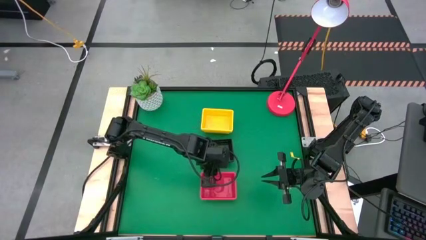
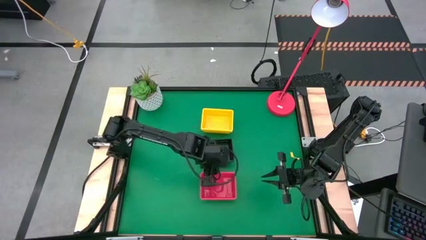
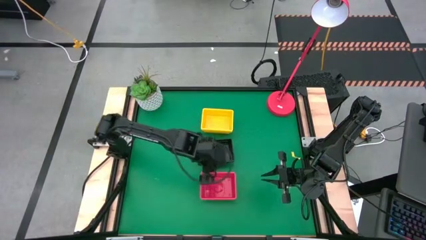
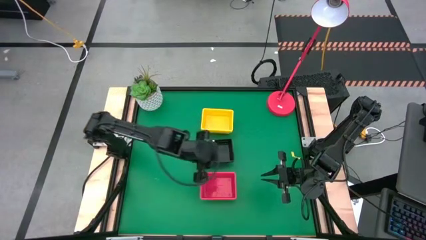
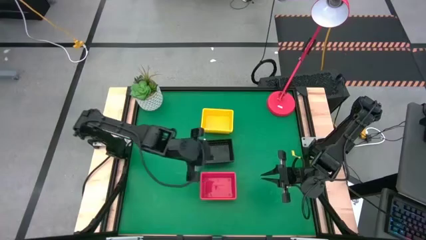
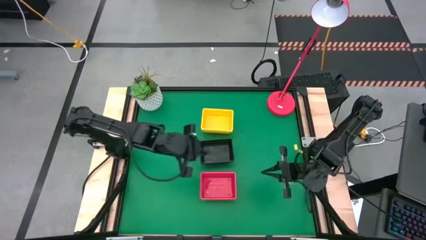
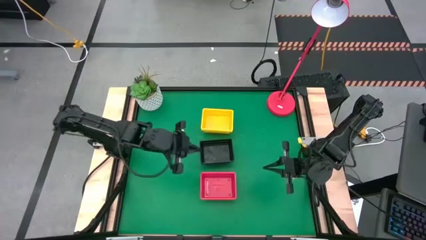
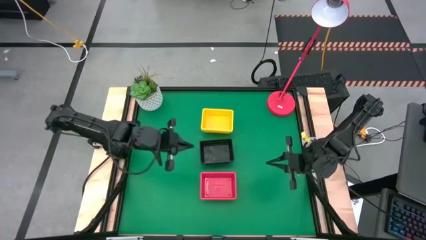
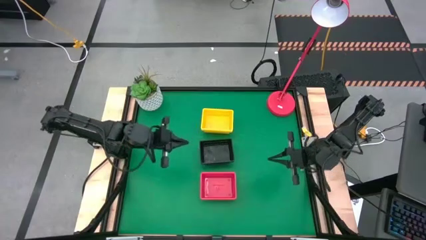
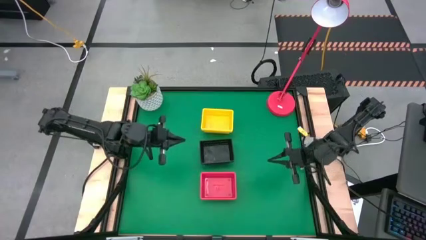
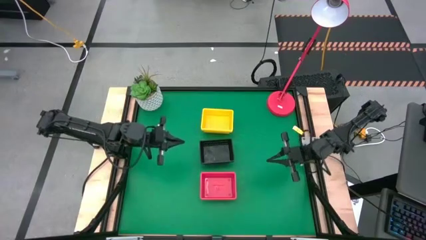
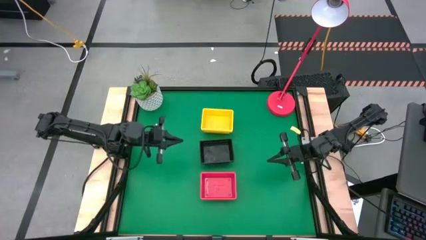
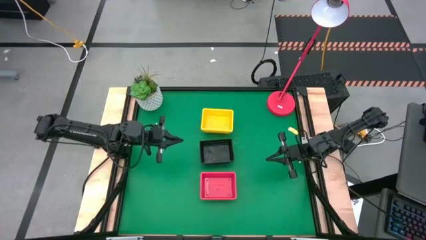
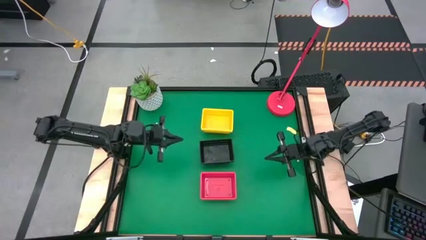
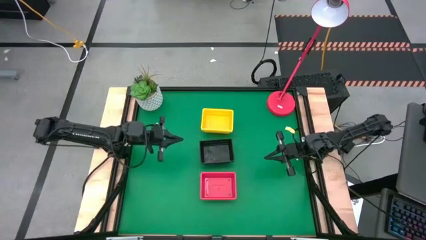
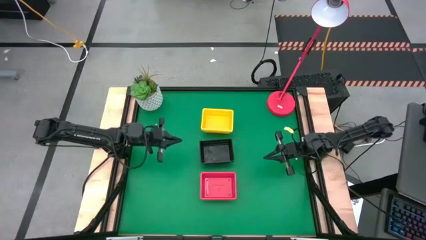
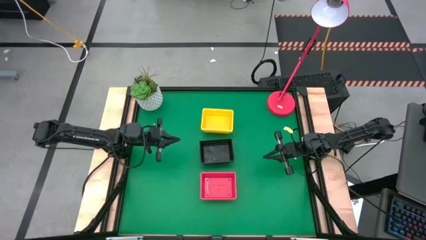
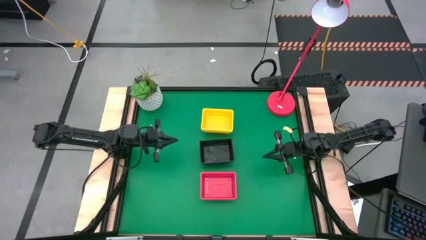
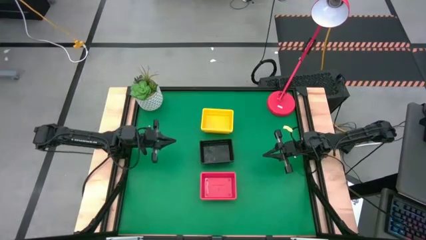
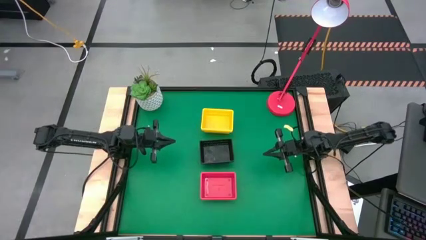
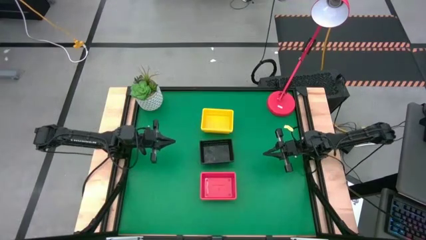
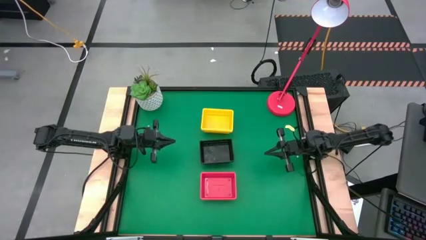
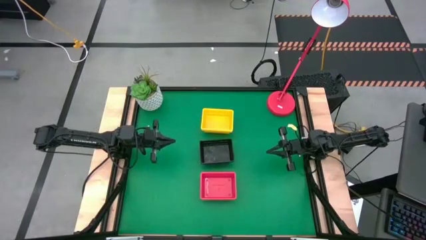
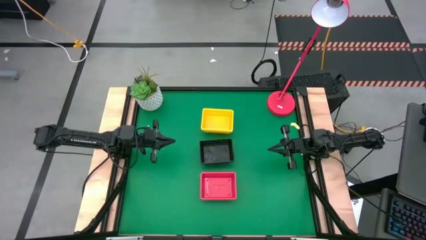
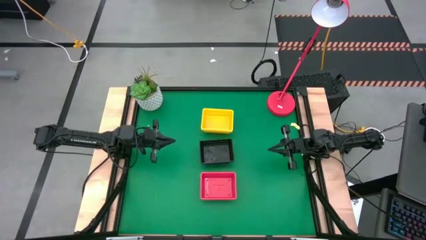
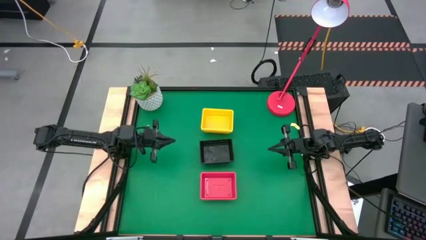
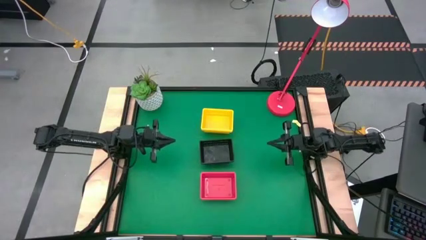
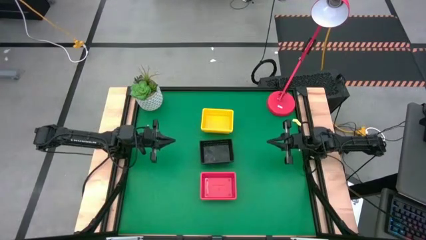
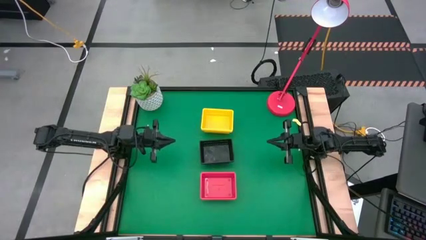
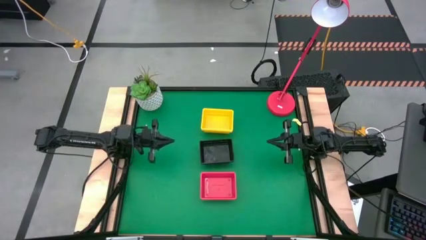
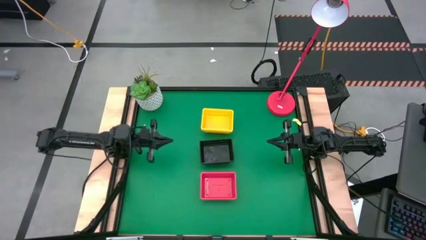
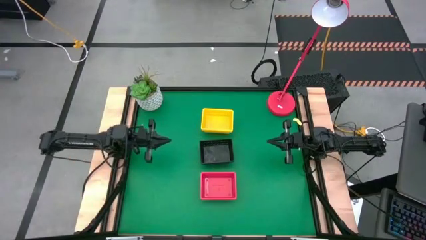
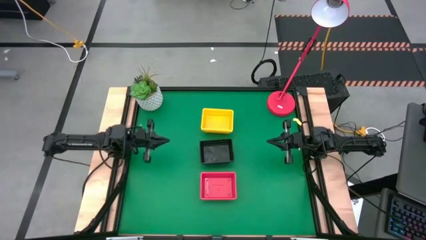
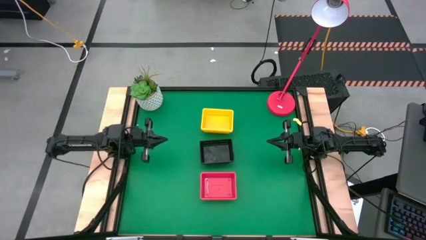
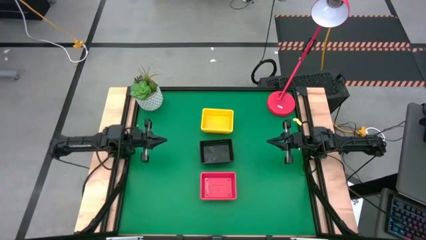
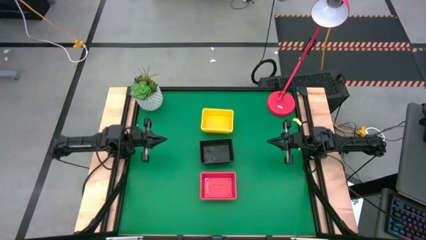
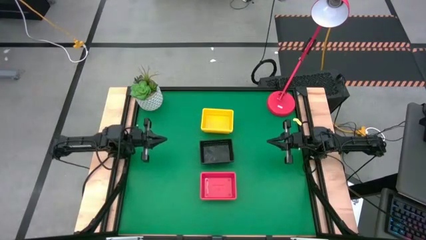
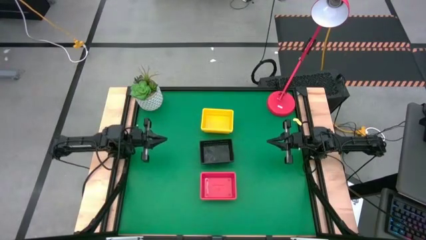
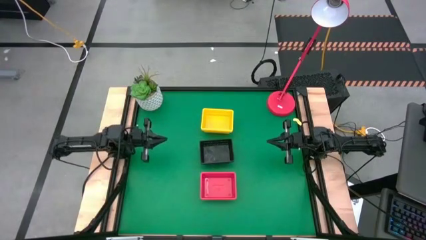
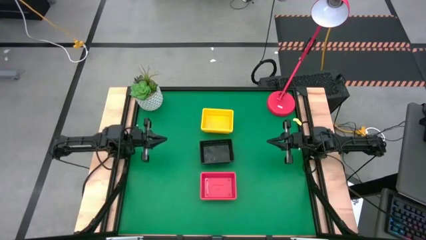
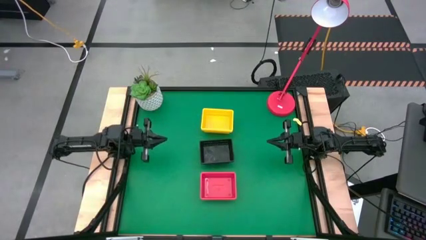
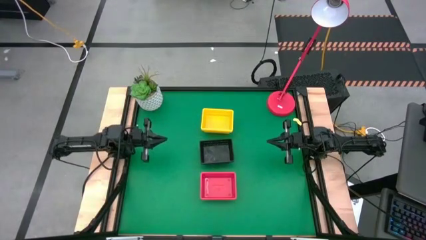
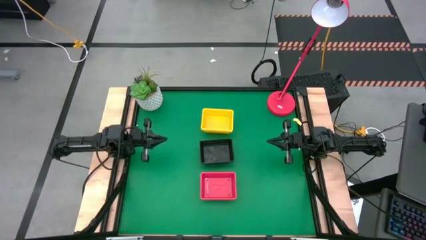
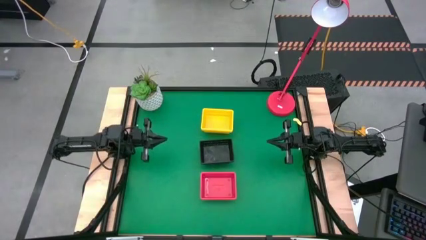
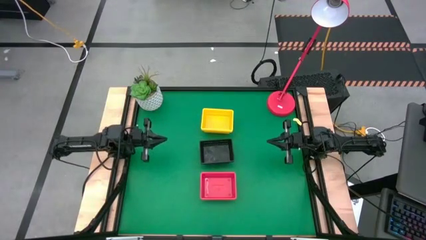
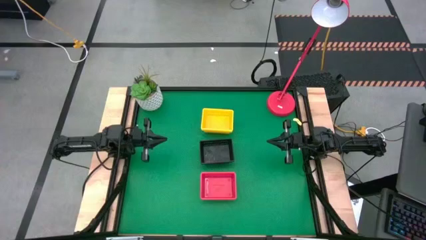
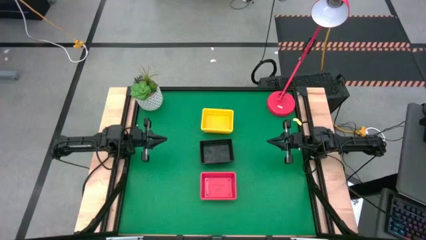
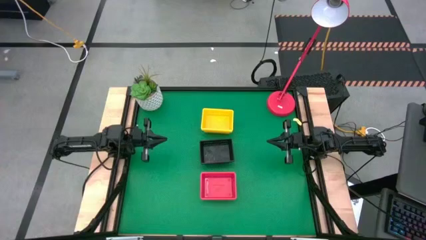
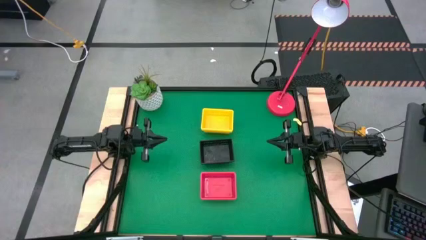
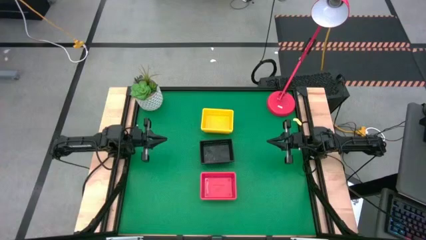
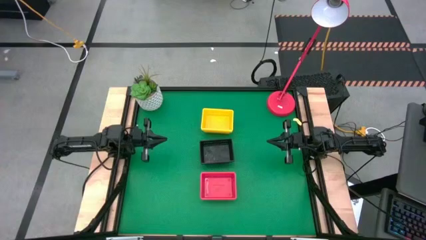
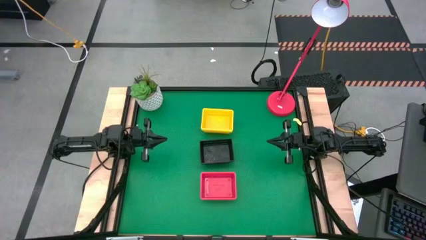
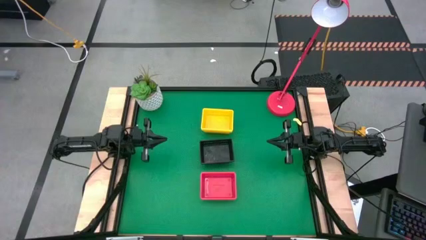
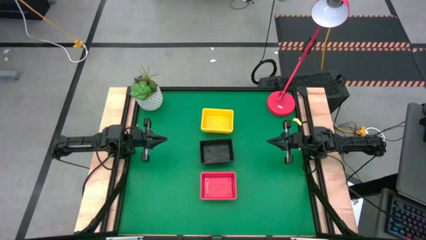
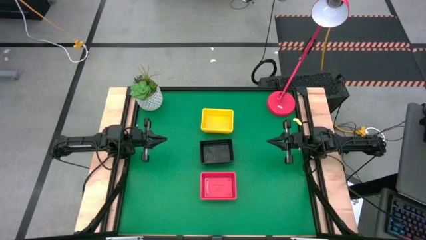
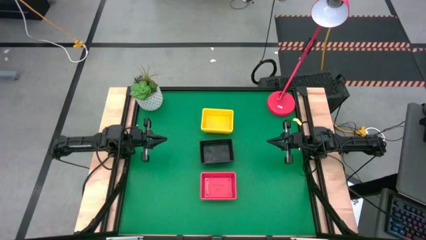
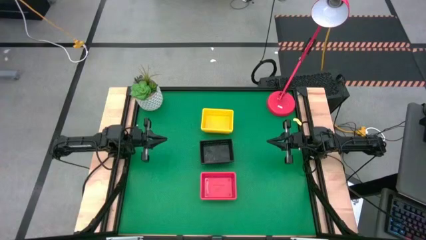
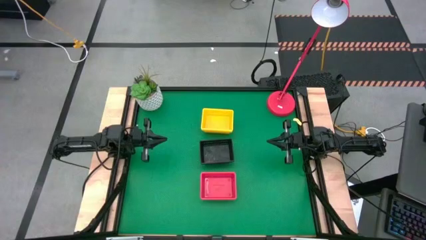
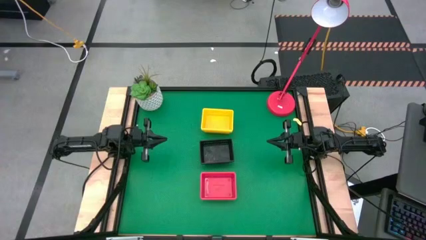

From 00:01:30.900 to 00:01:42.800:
Return to Home Position

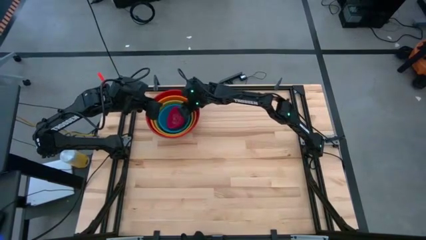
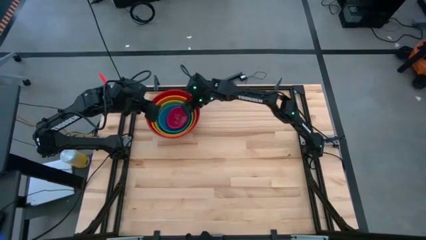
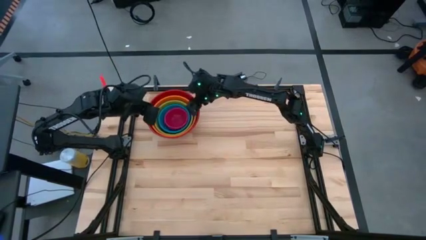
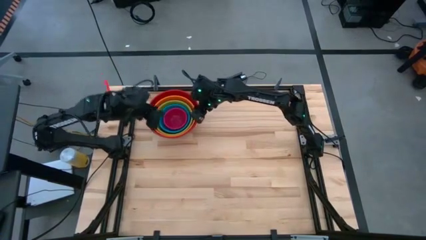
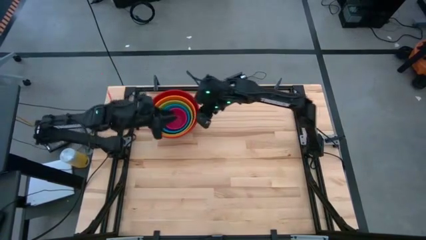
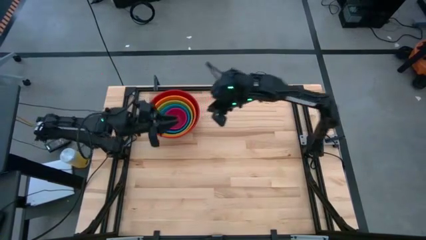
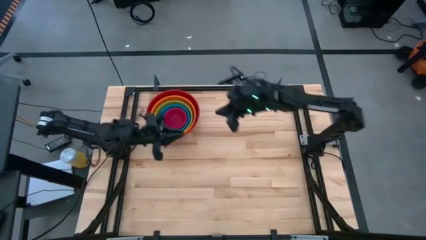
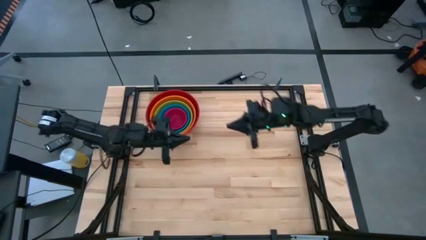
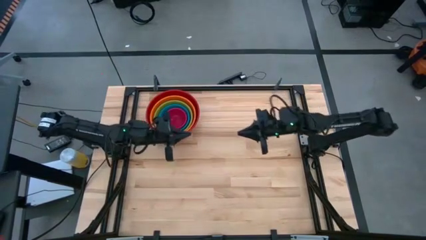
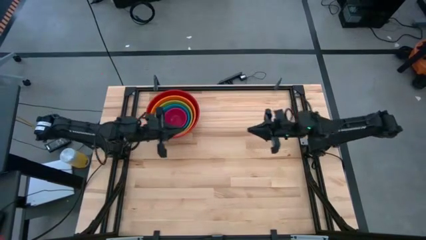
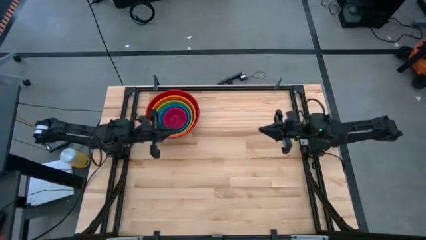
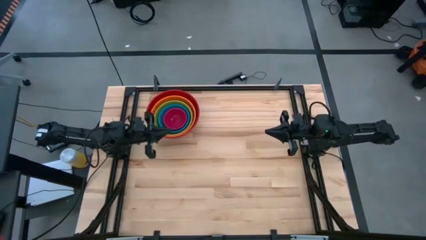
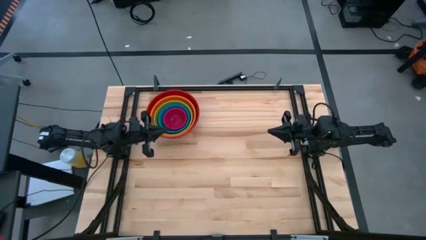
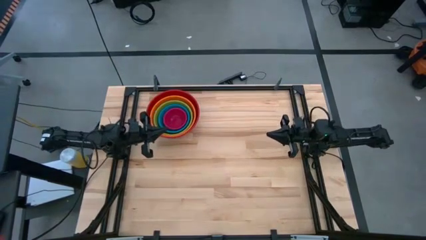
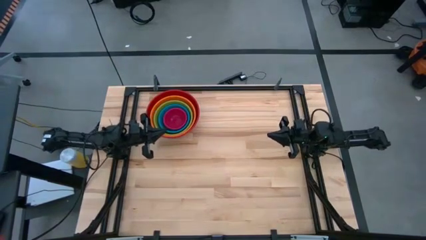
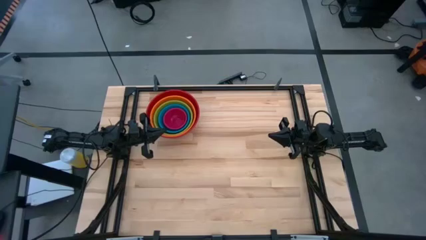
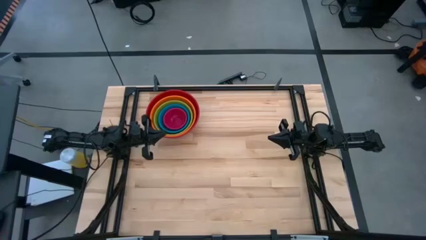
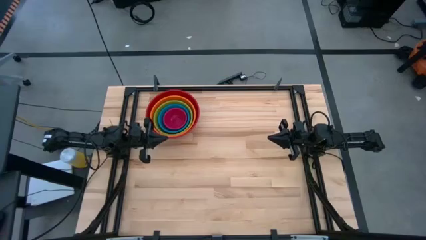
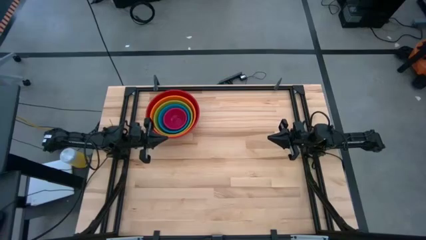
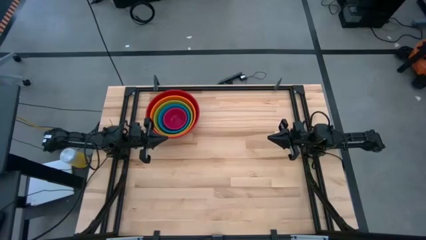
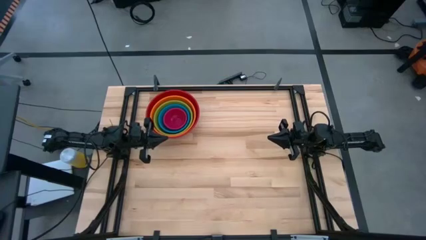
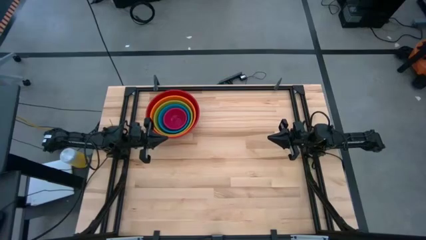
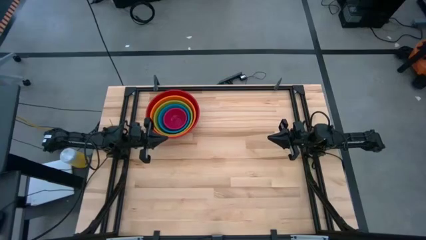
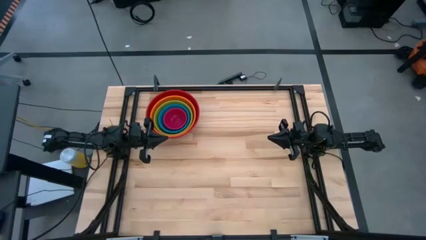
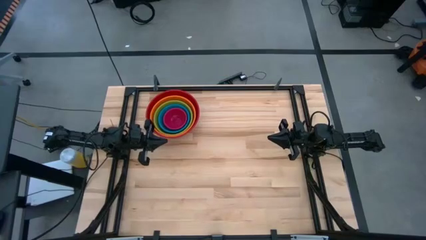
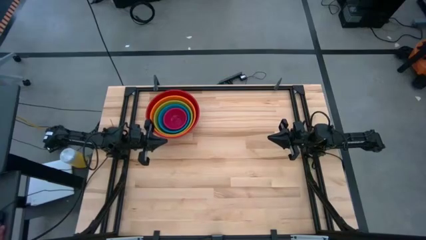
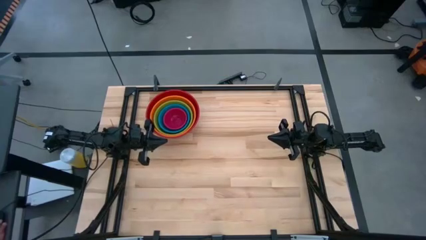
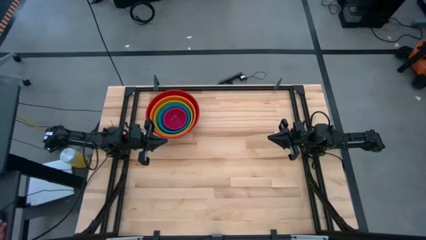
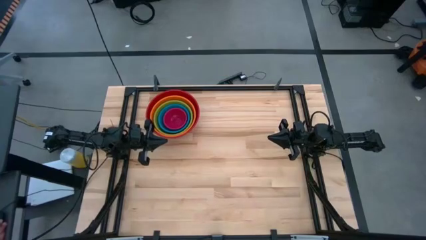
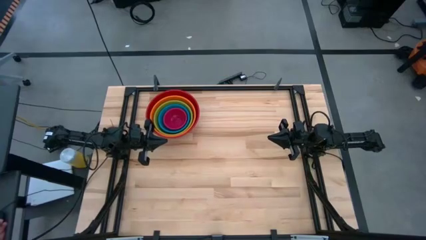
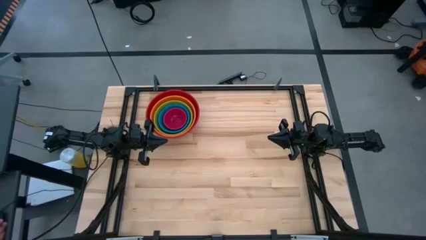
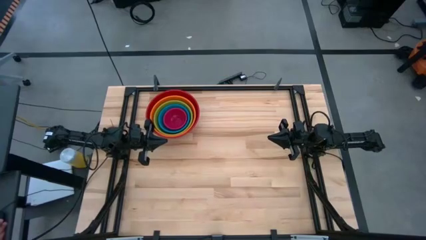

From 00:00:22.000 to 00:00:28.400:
Return to Home Position
